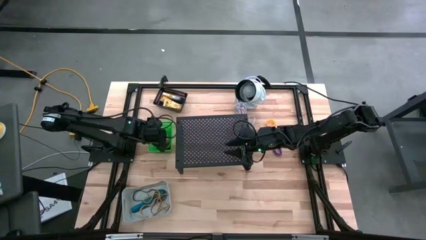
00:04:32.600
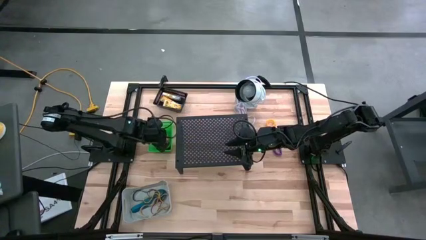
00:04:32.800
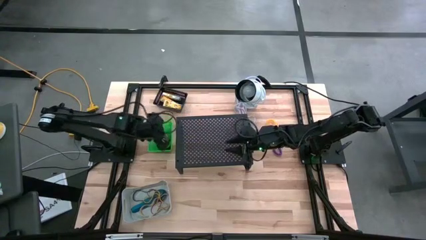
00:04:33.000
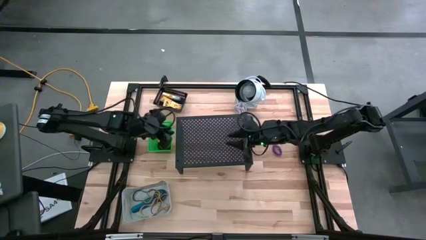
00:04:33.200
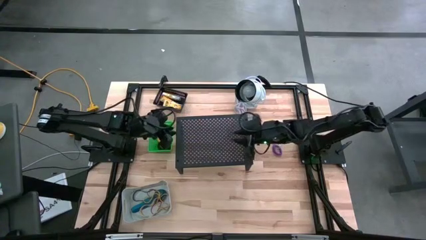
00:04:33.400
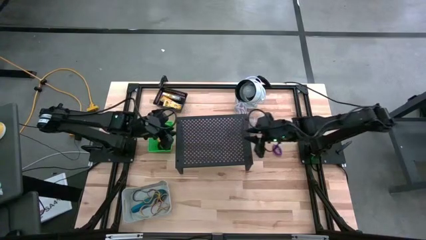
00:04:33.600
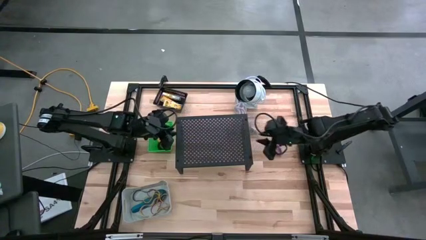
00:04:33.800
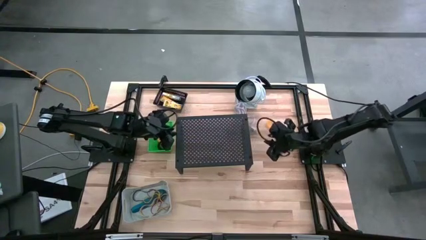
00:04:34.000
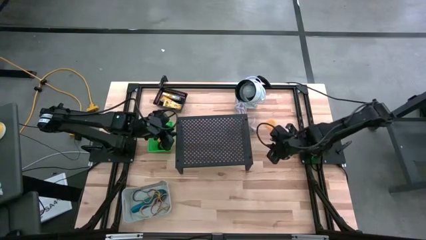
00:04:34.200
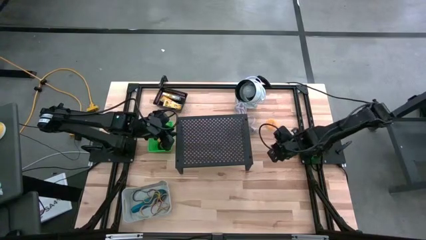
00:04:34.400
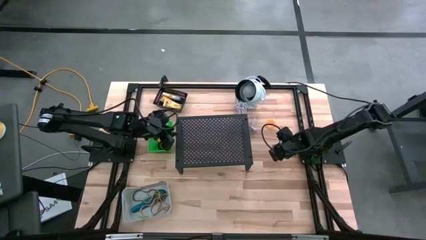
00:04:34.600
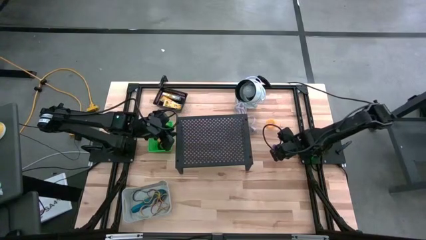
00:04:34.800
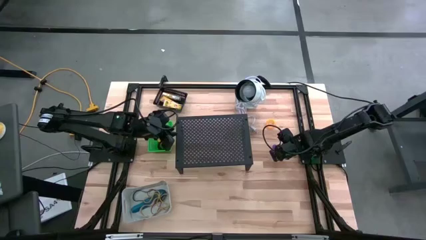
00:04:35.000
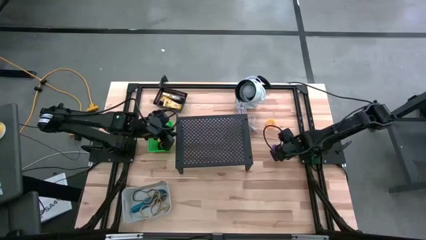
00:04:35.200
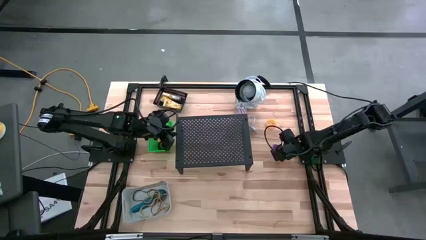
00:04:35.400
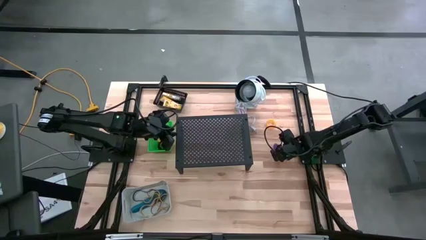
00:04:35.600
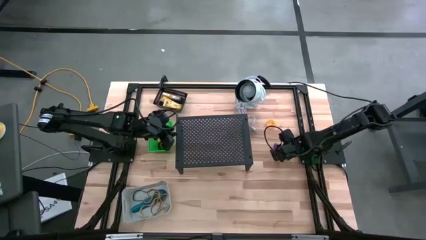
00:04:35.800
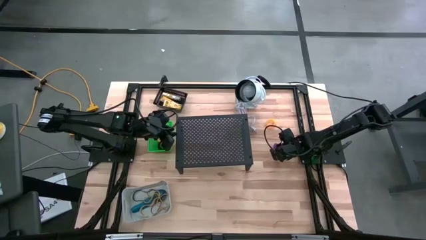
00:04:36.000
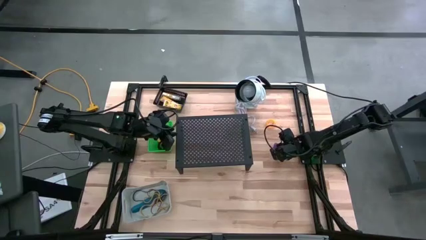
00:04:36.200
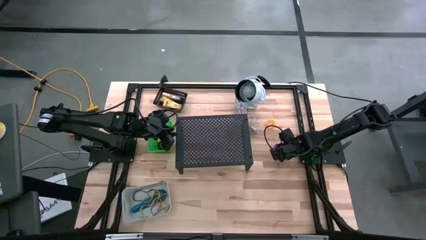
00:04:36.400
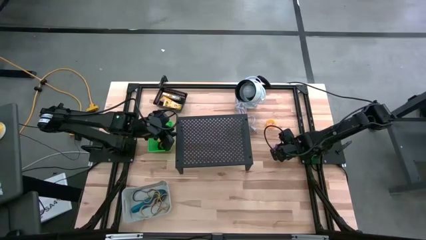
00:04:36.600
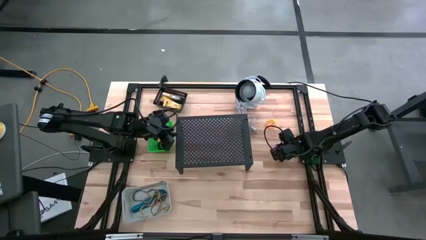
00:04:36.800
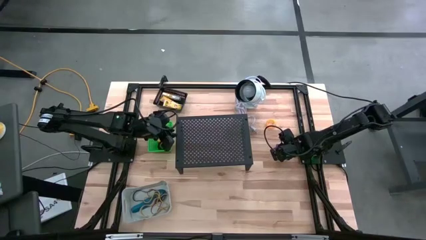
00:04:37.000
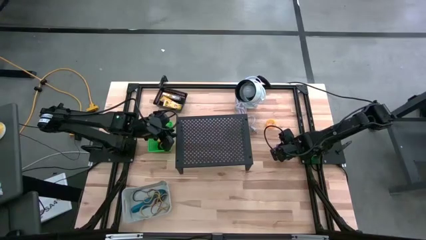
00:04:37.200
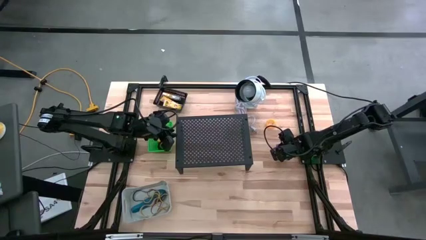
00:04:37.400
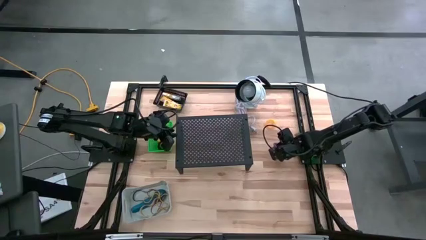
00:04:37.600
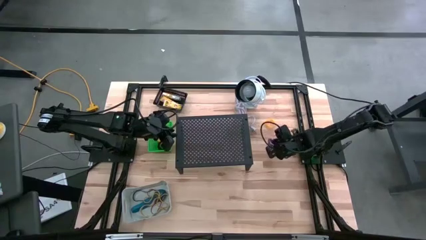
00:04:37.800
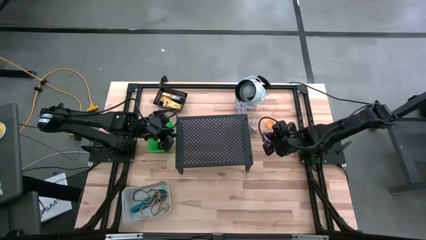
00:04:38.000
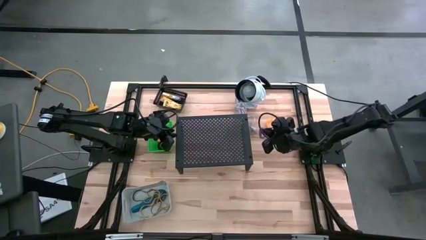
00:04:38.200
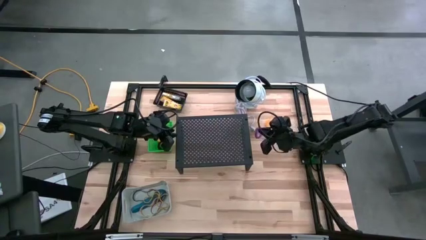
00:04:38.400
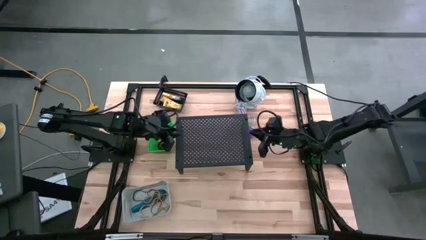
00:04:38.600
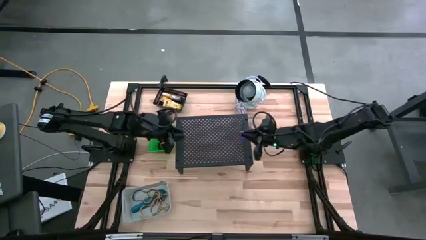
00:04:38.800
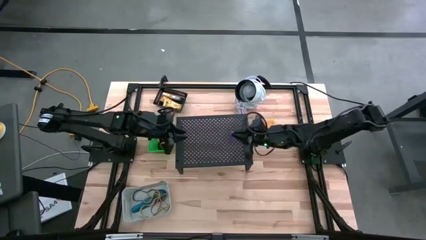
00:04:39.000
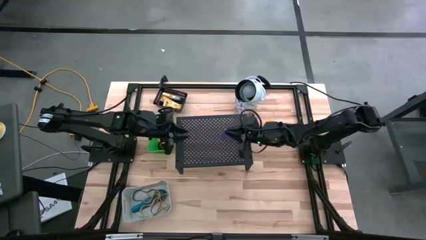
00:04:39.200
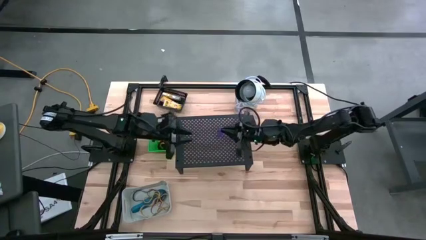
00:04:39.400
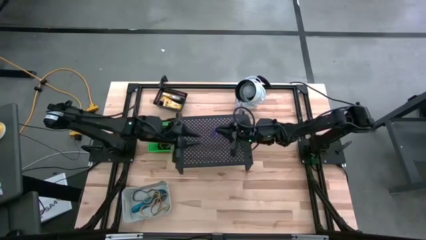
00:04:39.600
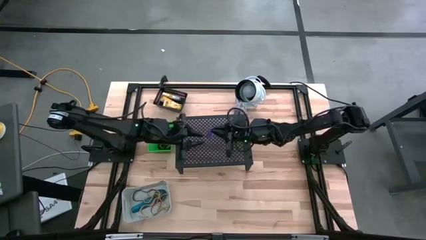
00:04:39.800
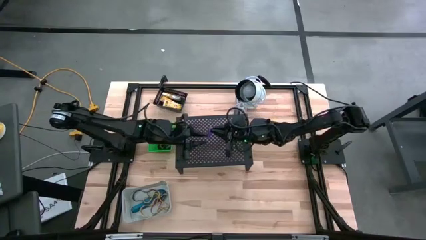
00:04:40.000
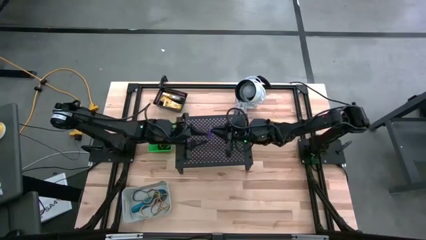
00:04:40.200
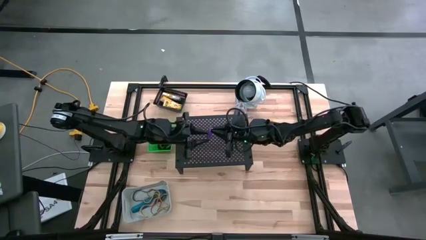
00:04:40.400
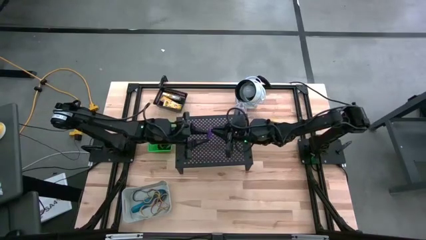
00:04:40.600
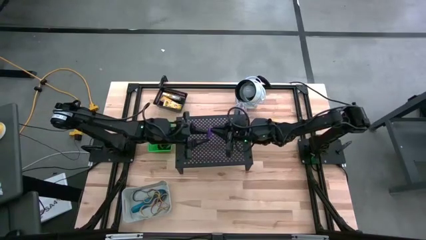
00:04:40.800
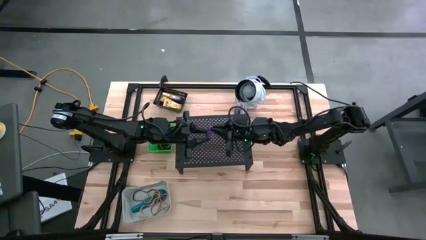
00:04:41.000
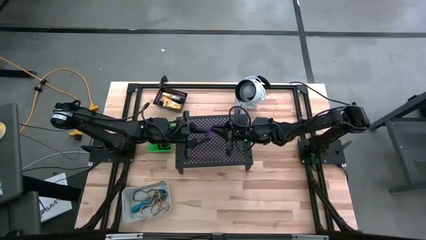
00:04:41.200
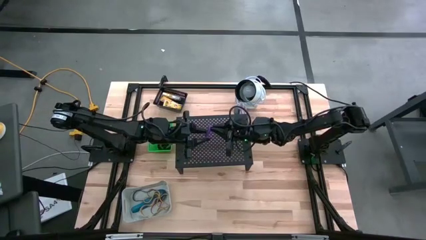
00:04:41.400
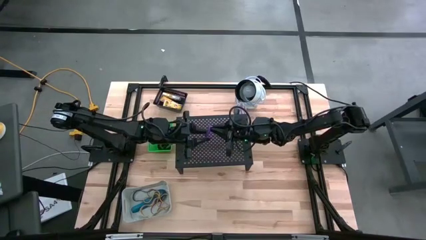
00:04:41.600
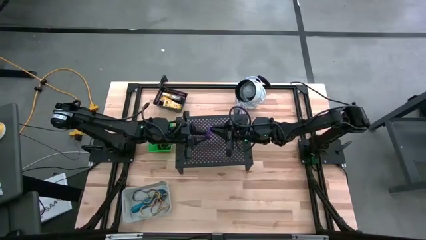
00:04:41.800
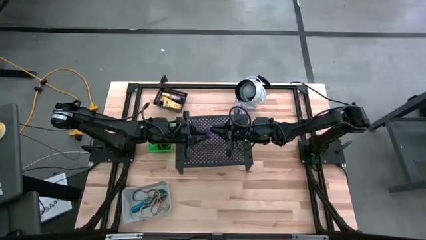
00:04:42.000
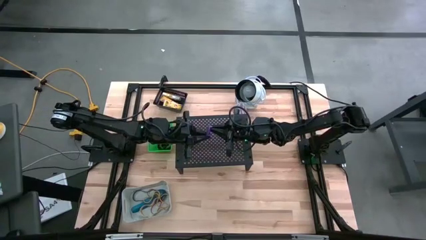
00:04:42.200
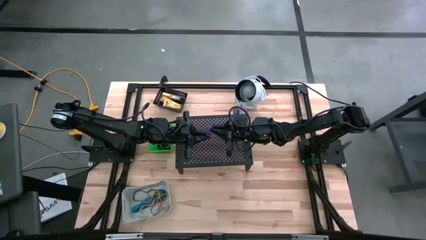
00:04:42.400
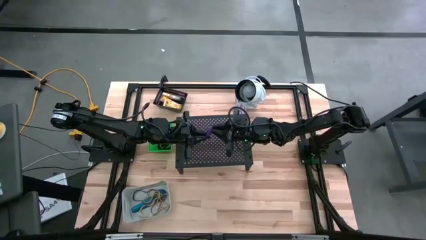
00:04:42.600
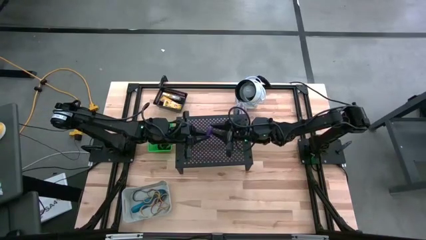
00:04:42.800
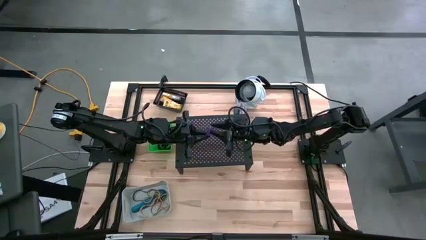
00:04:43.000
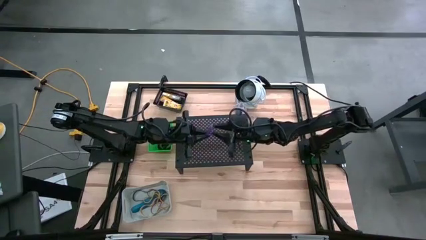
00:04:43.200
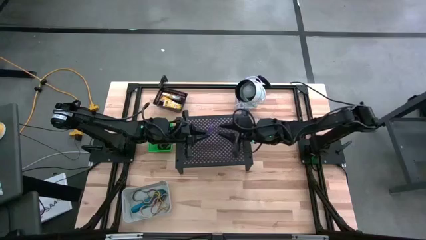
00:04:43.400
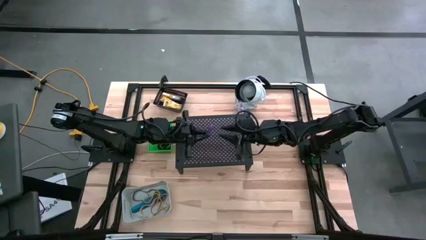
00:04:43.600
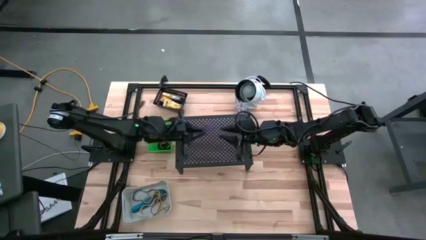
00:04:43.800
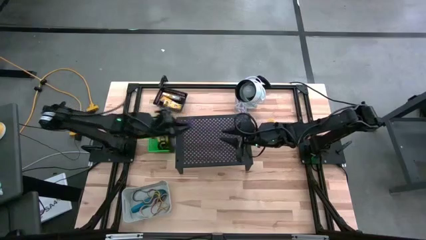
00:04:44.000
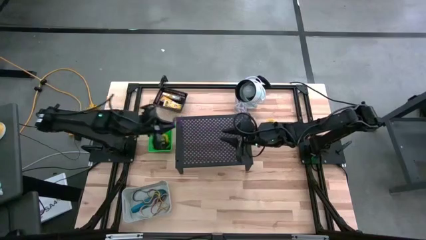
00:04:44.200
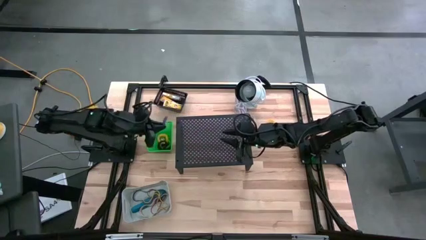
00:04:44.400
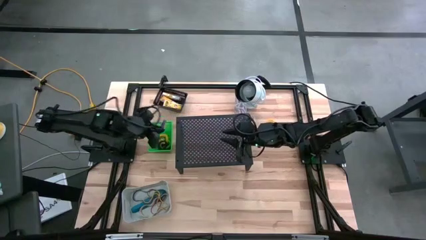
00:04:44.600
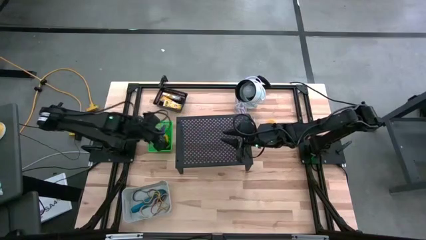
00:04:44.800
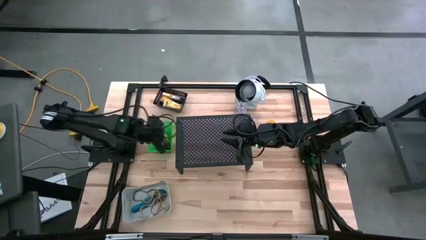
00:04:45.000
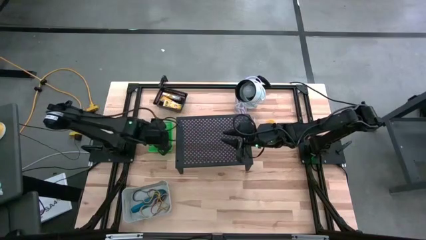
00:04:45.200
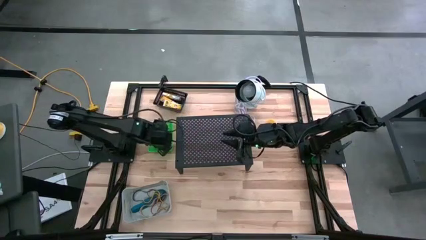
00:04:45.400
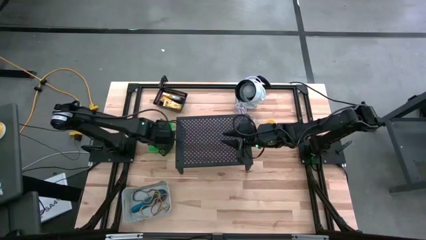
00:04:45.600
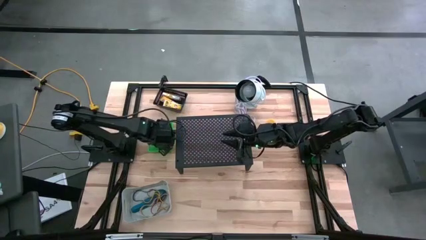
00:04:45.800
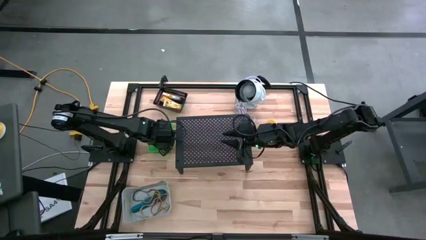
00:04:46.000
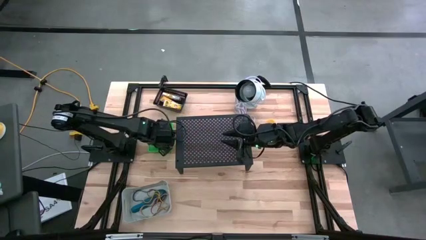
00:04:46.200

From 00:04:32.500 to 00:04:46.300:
Task: Pick & Place Office Desk Supplies
Put the purple spring keychain into the green bin

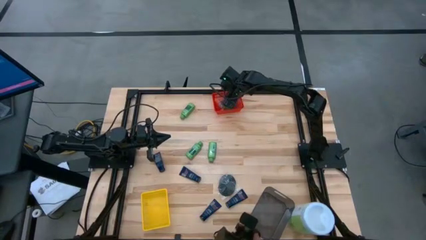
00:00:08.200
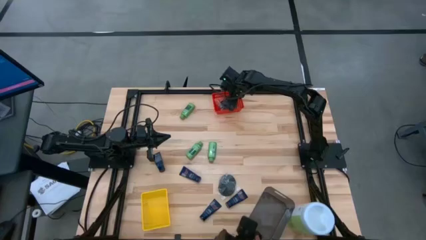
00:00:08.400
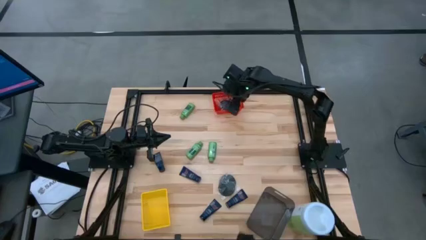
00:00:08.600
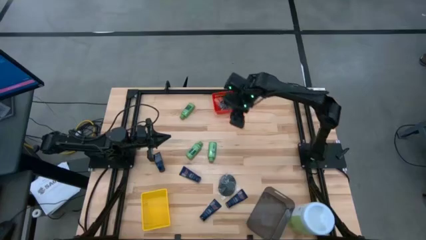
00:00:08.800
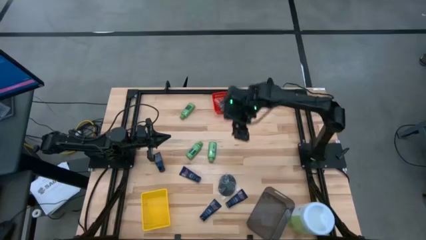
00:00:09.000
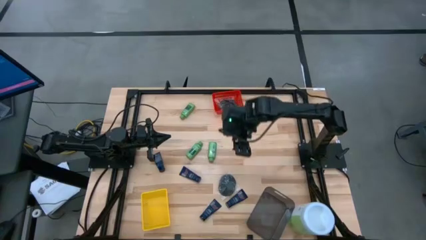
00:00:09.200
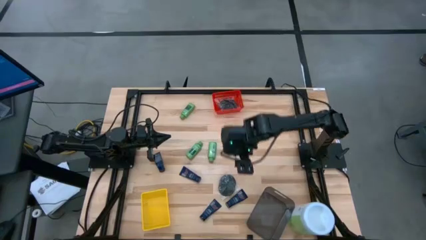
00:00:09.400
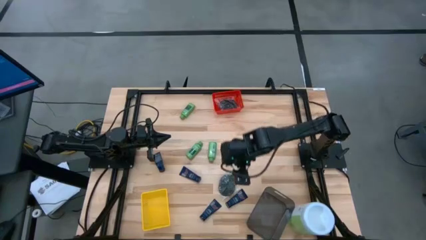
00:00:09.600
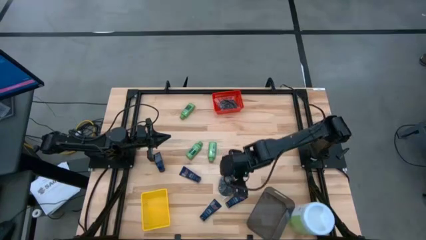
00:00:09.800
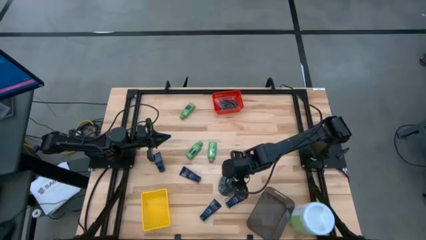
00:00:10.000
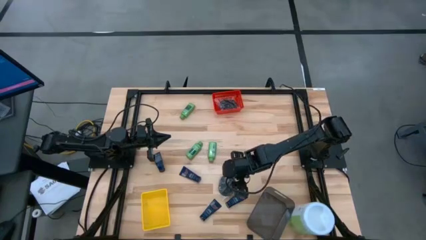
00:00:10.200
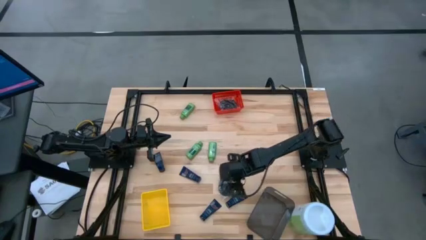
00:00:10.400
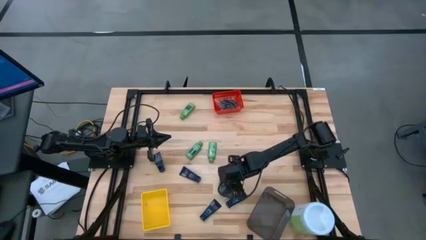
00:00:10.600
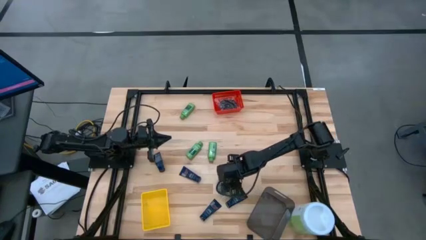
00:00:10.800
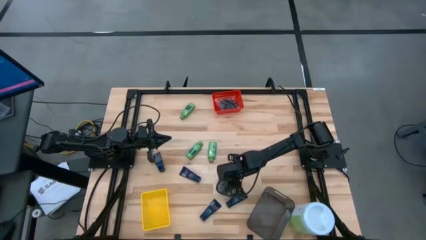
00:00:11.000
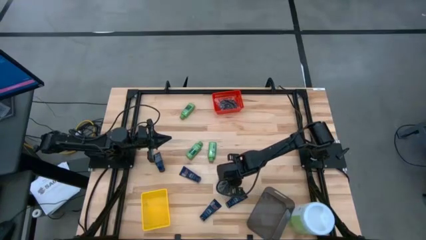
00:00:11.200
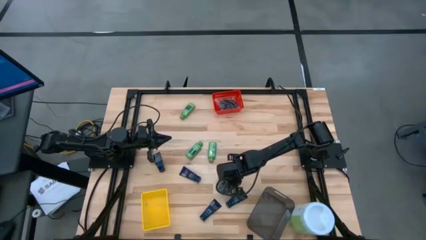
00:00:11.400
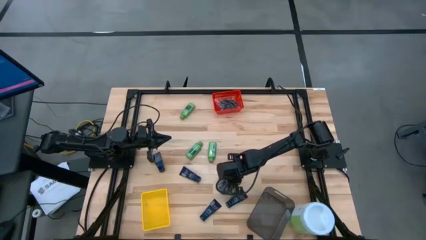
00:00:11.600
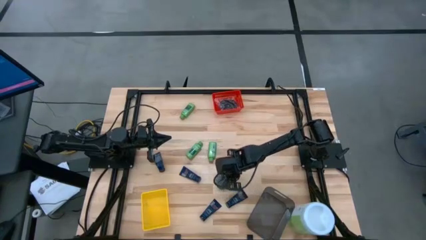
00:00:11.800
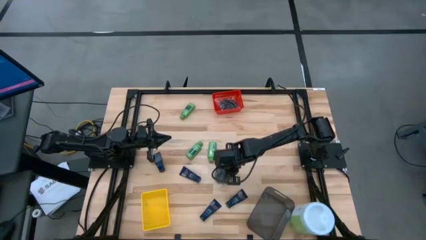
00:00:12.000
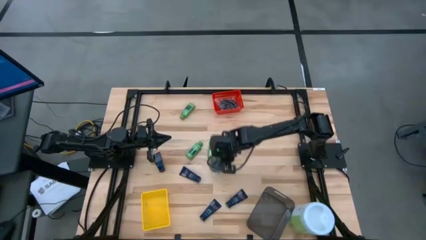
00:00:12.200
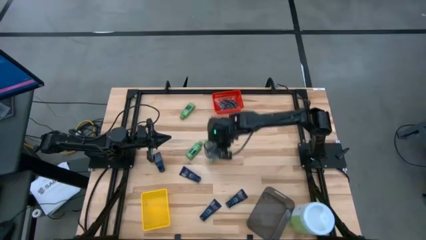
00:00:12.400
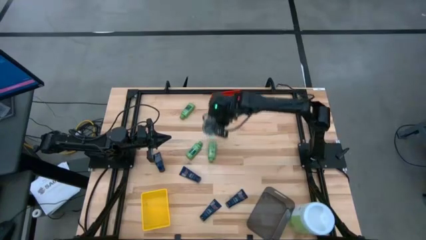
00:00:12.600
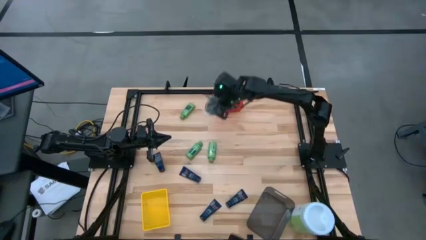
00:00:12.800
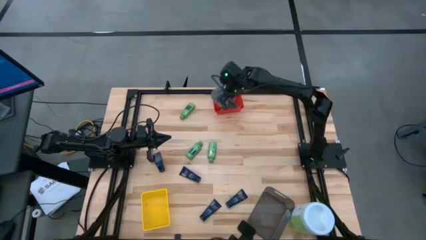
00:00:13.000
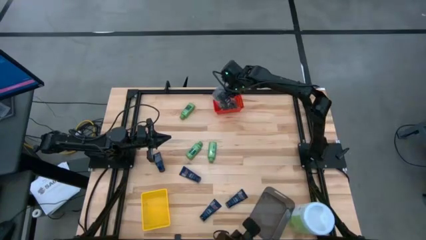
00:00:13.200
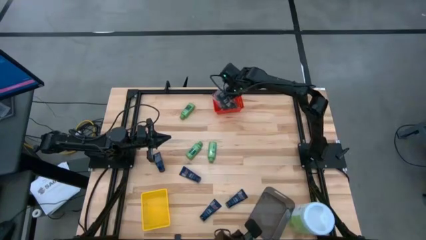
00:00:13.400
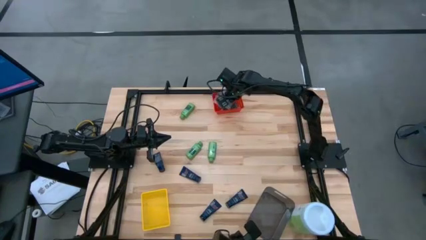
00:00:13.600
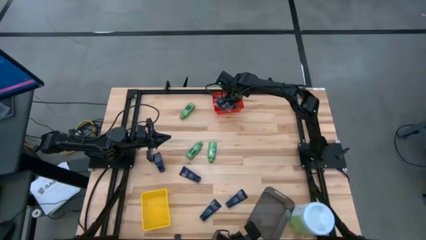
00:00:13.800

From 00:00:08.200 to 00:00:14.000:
Task: Pick & Place Travel size toiletries
Put the black hairbrush into the red bin
